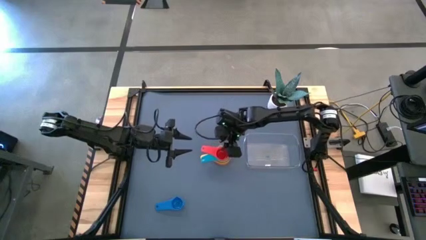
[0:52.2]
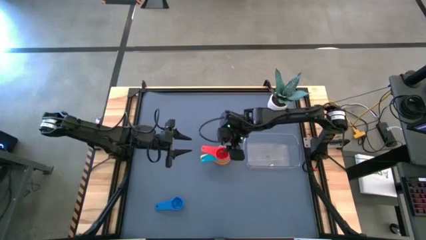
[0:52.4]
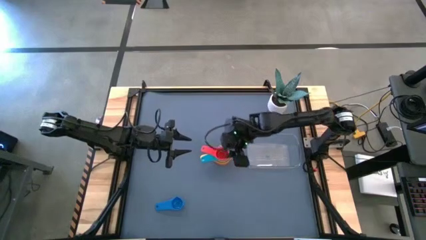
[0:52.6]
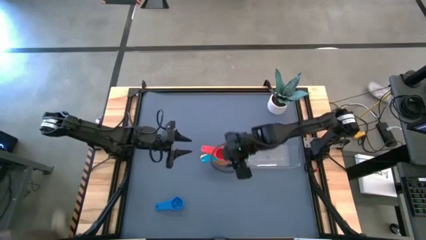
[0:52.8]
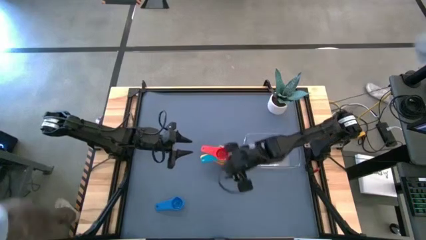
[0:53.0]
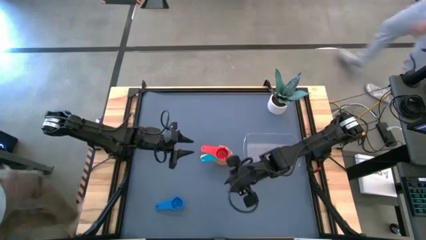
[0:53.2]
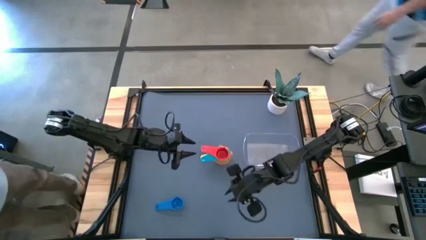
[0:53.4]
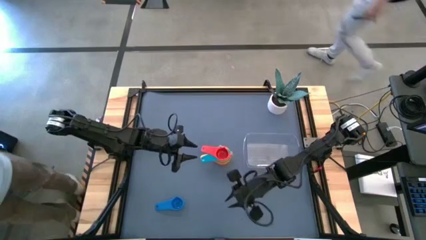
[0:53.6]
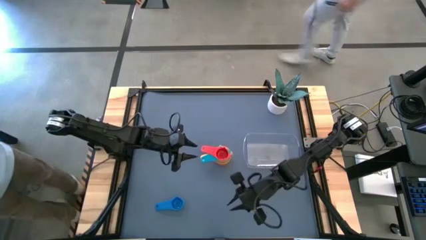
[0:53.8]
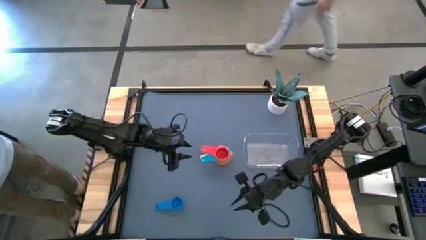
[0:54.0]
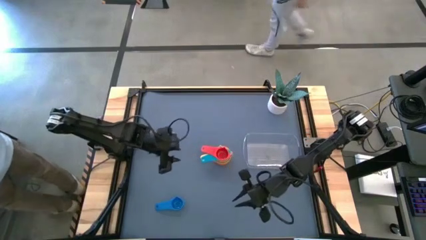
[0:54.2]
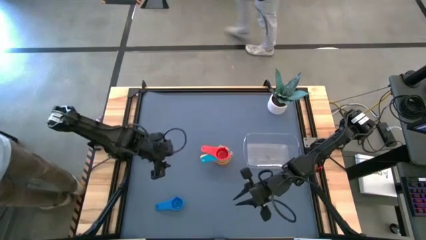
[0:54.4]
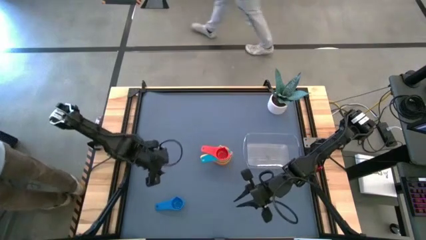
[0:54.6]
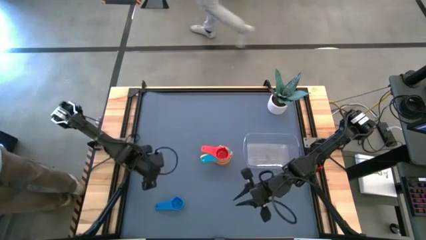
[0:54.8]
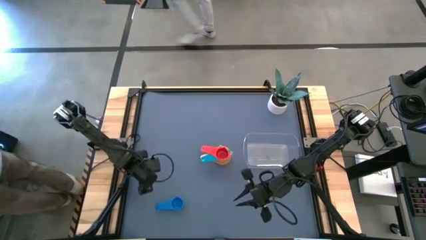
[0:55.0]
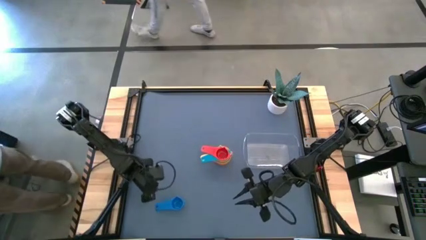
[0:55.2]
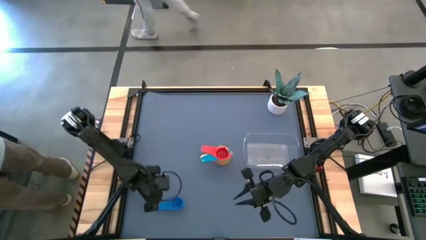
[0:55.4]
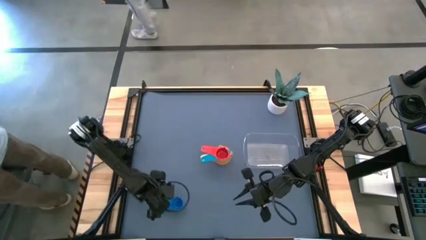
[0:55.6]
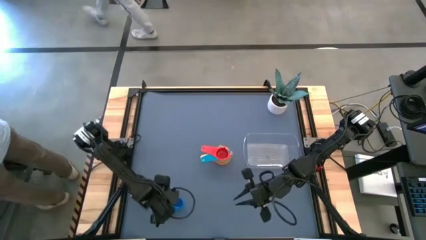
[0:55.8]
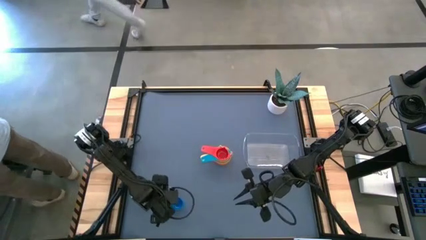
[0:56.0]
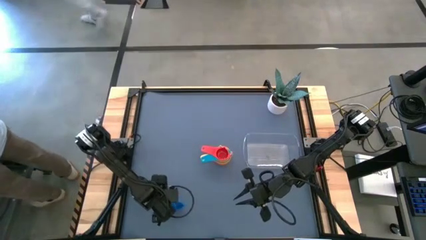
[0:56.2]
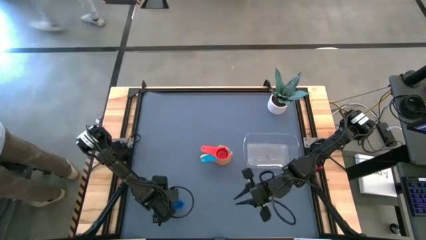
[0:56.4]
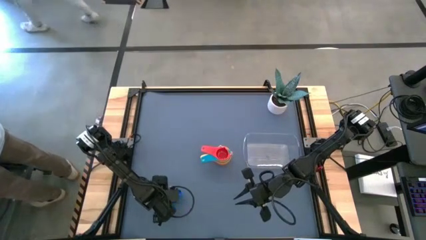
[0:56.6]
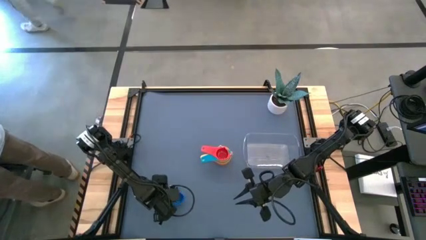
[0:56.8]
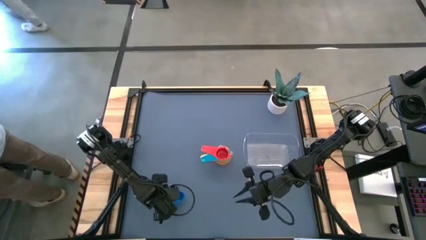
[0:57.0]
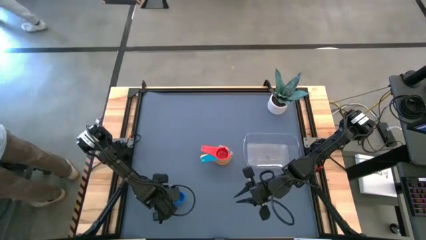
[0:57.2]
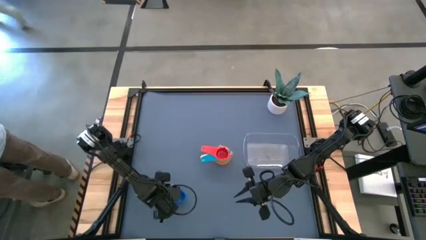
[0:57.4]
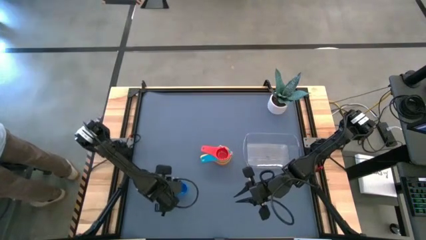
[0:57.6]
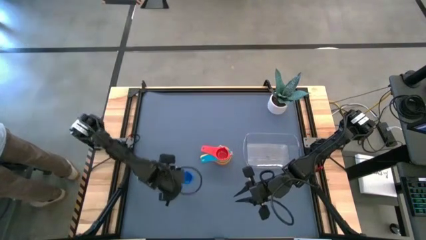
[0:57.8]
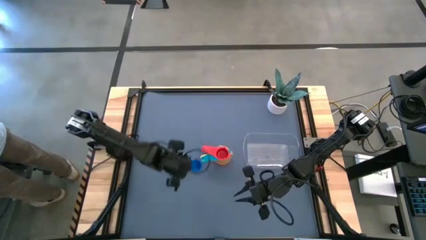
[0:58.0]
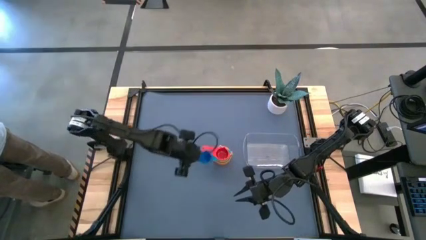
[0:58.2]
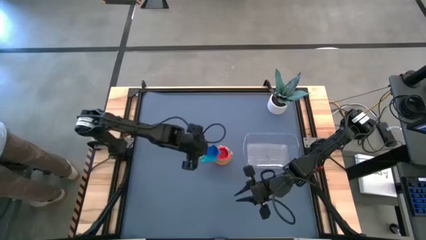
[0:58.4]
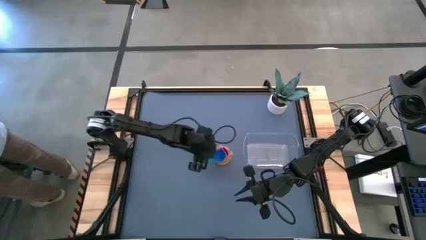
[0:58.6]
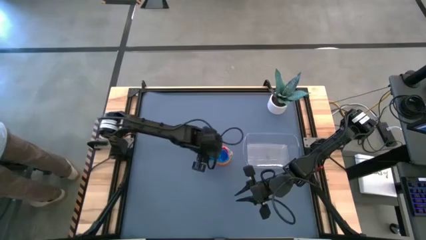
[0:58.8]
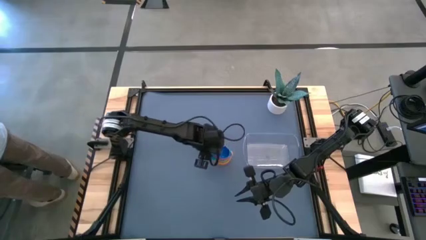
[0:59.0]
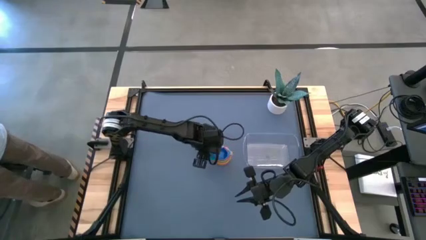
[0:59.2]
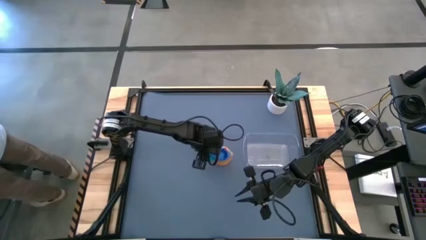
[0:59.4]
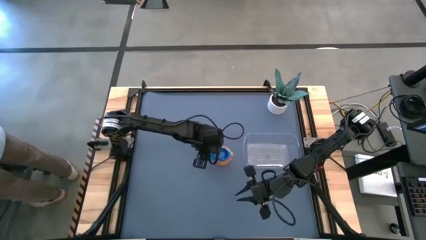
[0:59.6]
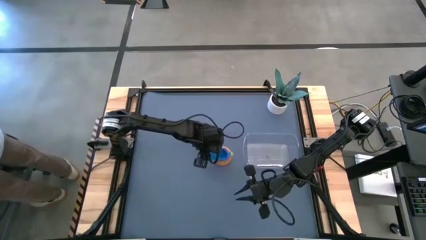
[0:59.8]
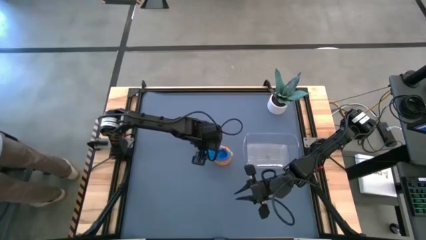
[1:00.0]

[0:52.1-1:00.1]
Task: Nest measuring cups in basket
Stack the blue measuring cup on top of the red measuring cup

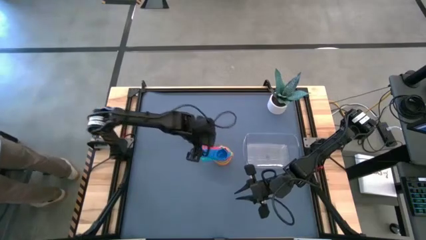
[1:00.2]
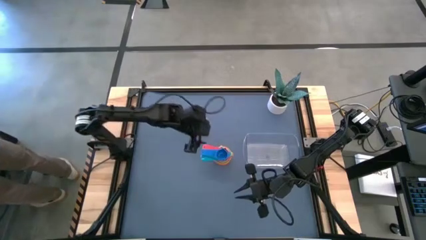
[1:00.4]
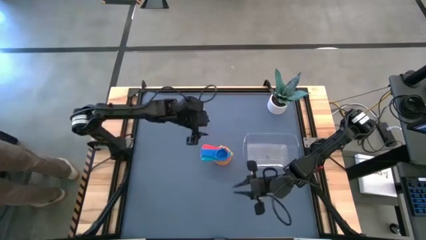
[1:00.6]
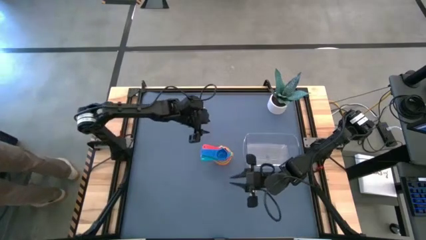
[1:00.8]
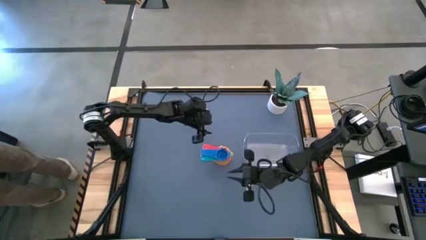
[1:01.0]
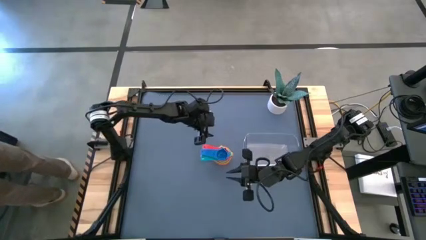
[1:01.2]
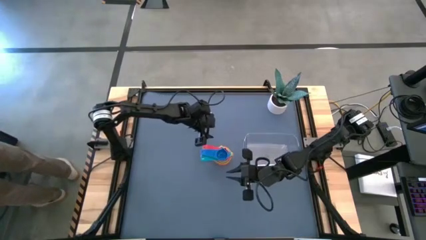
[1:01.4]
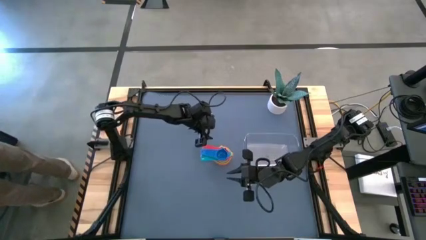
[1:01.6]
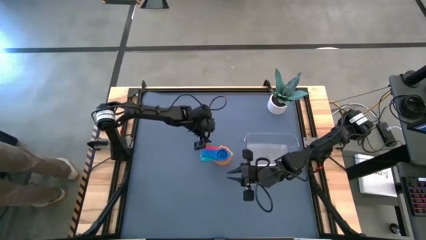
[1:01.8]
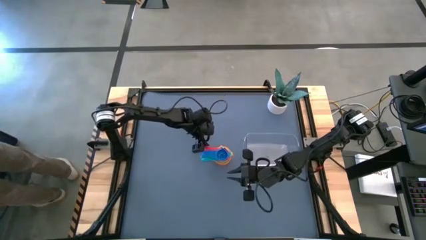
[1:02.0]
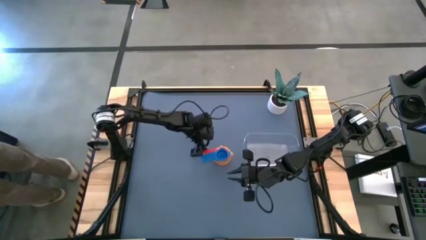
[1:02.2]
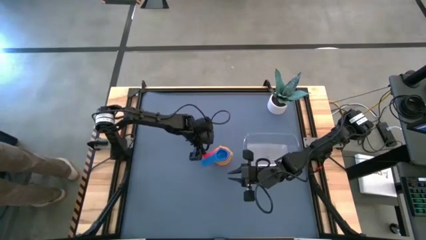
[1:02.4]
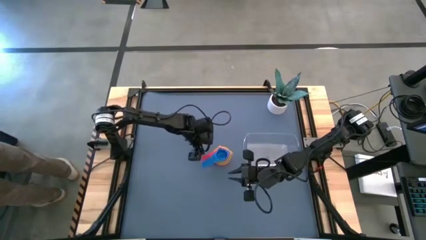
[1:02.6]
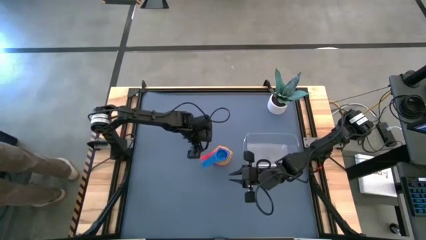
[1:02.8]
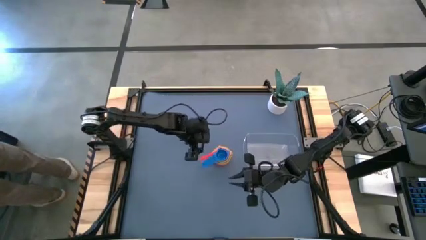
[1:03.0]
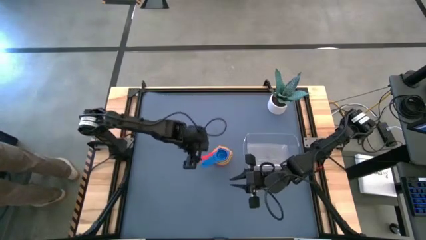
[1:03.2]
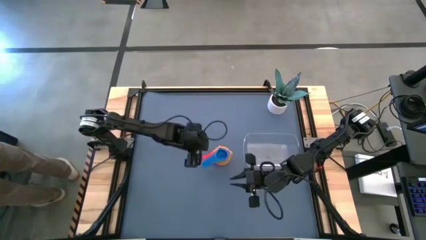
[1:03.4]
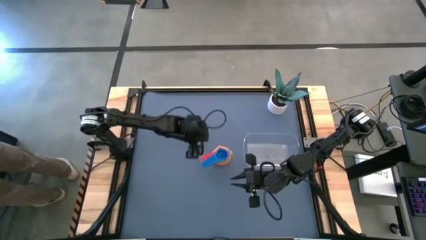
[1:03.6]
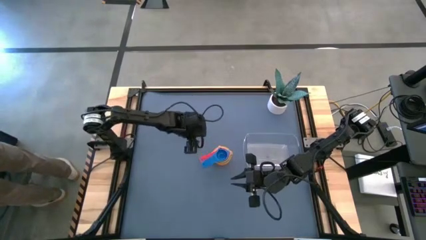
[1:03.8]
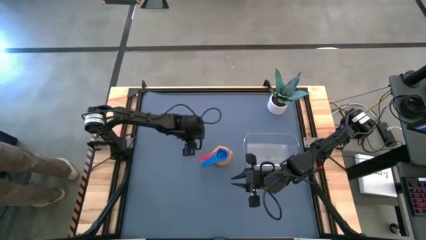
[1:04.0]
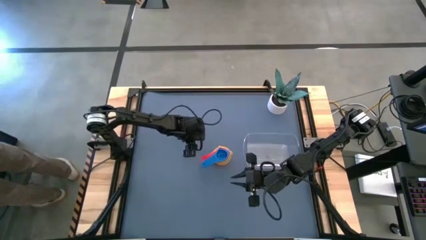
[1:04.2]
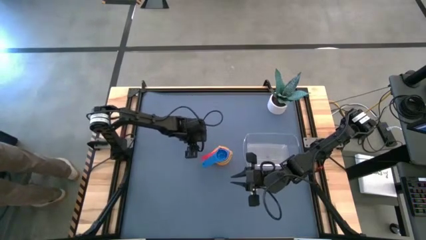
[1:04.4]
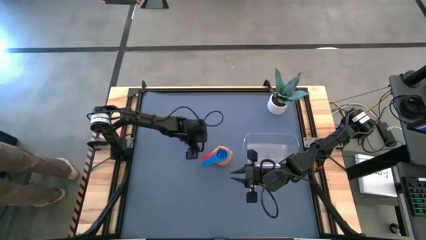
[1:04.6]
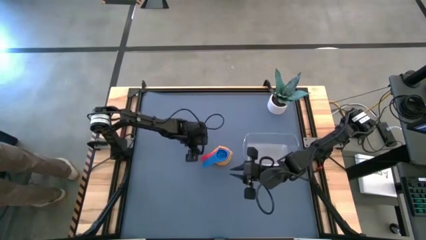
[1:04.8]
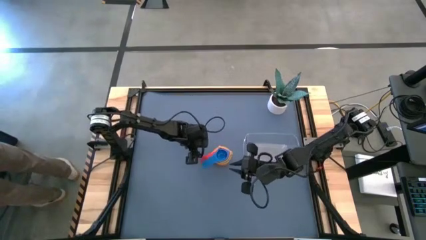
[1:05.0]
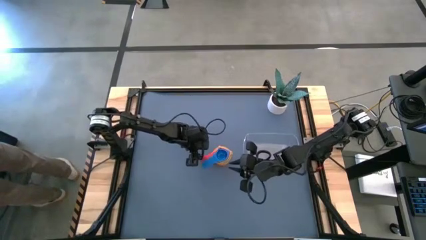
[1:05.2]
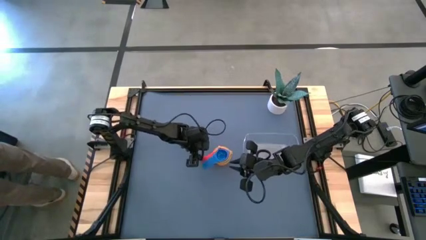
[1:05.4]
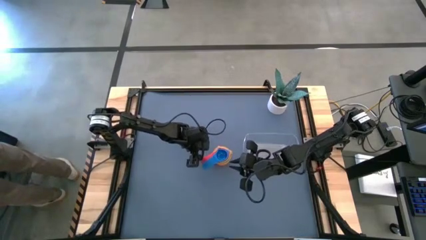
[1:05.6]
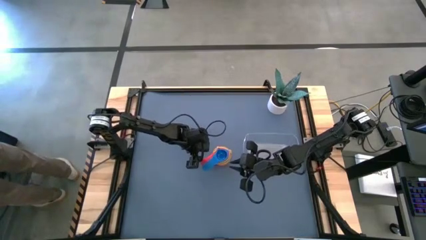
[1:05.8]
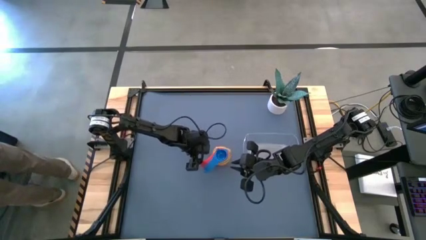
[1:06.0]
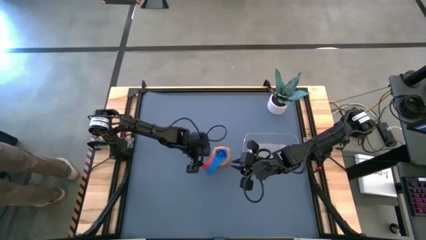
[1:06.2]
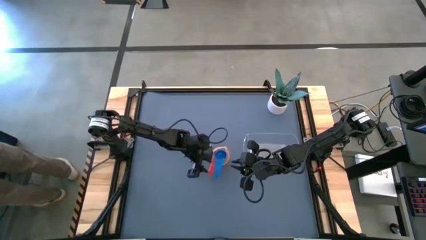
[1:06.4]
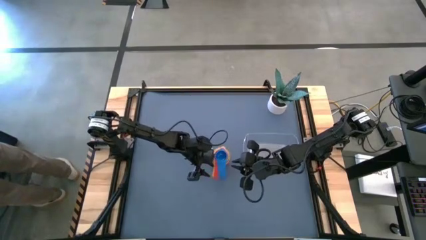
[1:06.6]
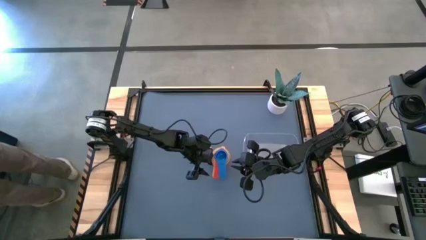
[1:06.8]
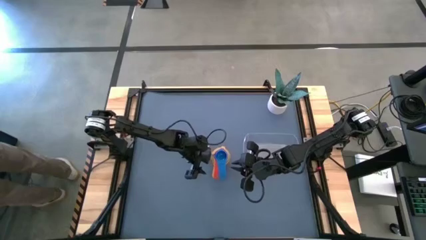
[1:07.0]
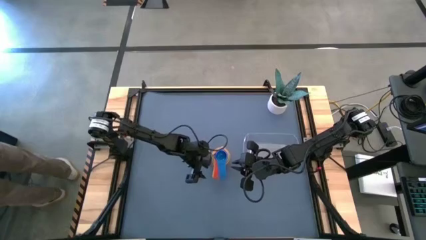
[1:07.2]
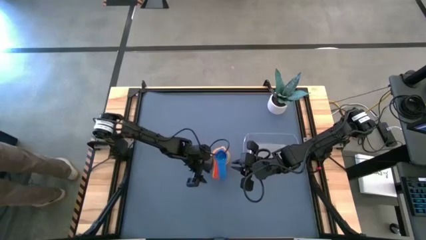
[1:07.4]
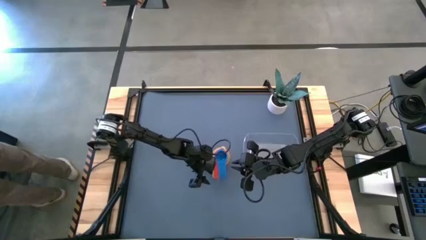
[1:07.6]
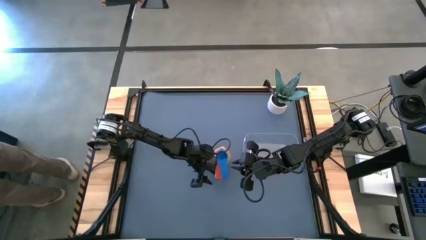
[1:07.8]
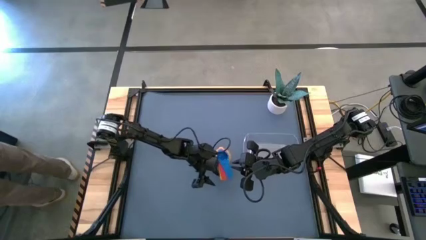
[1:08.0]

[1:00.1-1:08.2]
Adjust the stacked measuring cups
